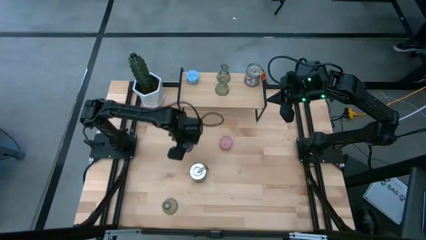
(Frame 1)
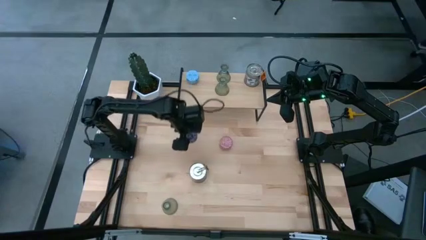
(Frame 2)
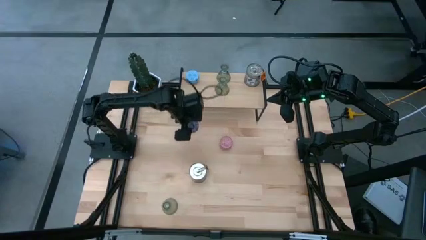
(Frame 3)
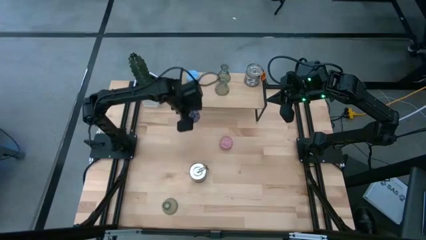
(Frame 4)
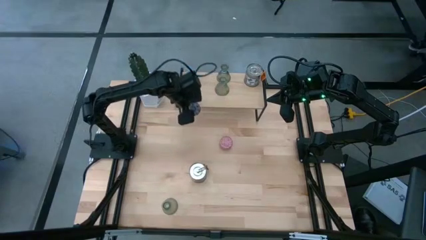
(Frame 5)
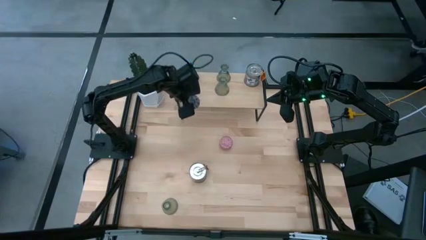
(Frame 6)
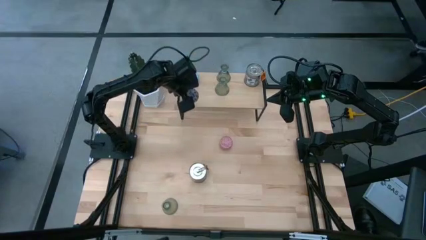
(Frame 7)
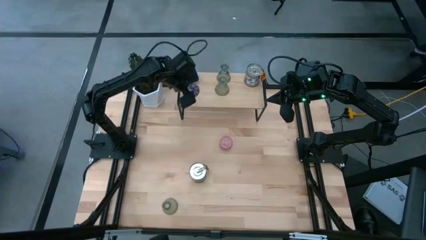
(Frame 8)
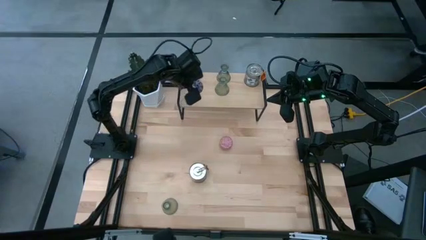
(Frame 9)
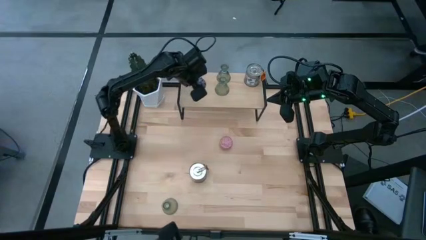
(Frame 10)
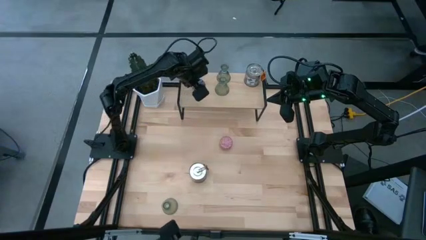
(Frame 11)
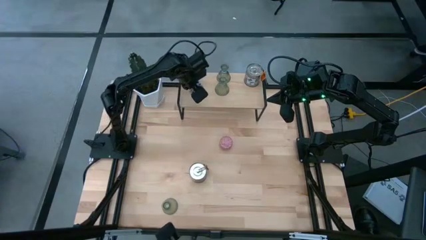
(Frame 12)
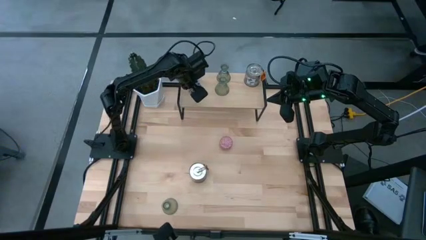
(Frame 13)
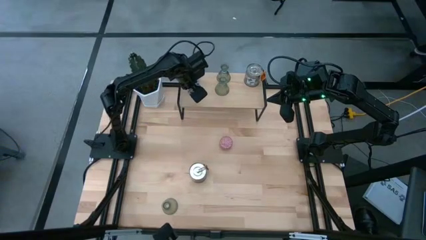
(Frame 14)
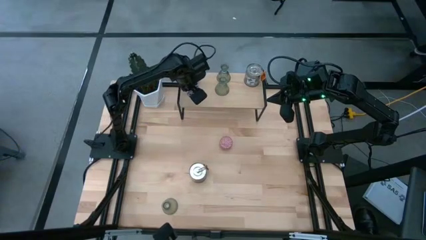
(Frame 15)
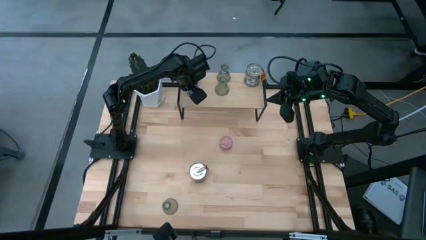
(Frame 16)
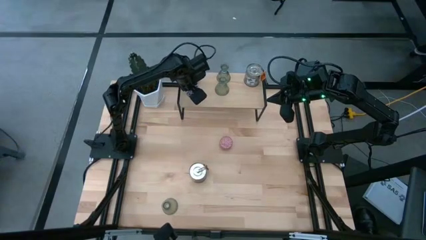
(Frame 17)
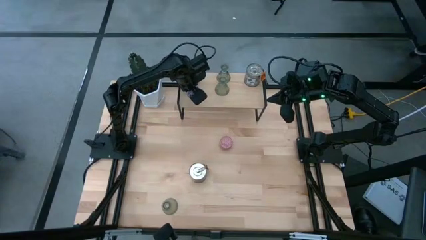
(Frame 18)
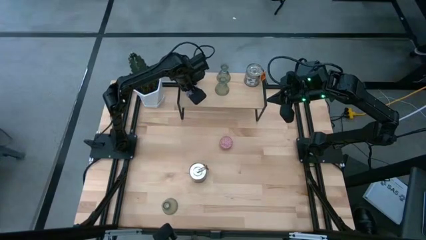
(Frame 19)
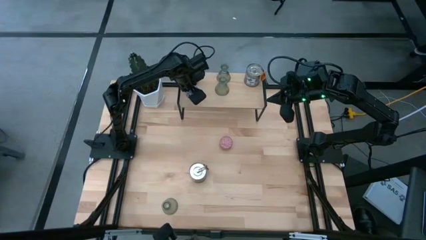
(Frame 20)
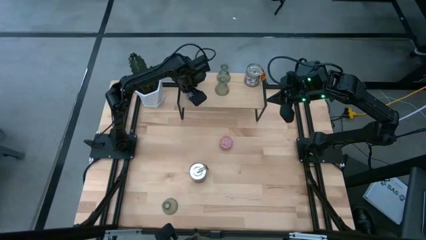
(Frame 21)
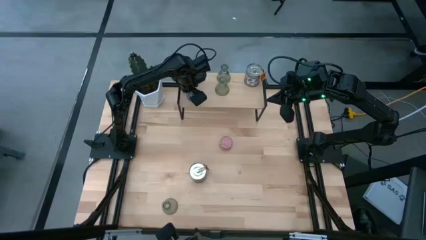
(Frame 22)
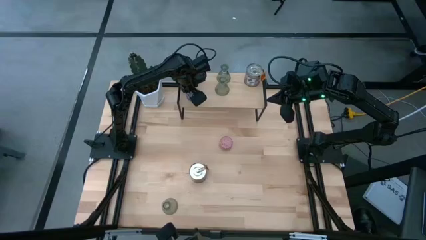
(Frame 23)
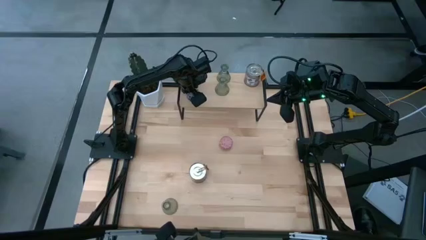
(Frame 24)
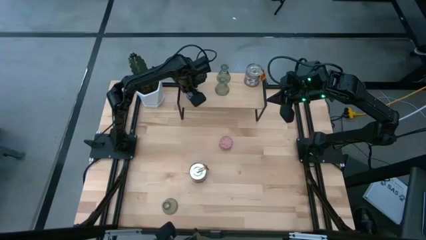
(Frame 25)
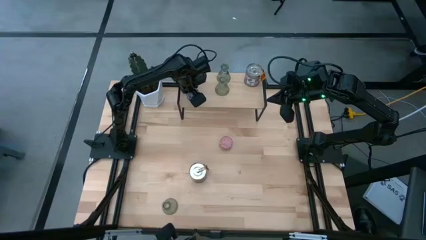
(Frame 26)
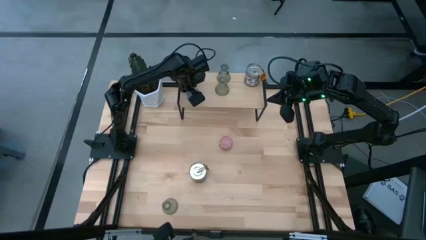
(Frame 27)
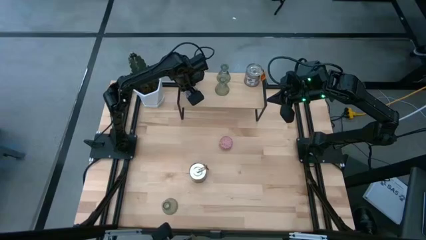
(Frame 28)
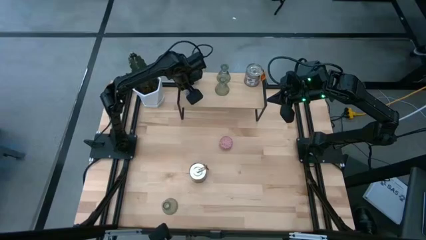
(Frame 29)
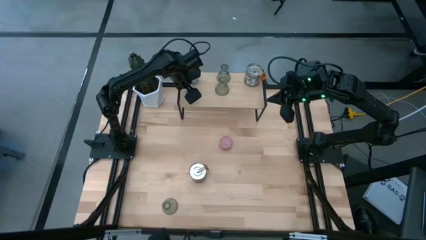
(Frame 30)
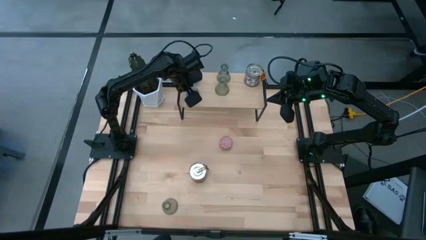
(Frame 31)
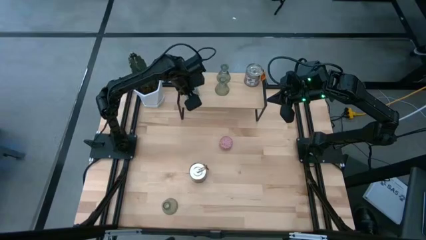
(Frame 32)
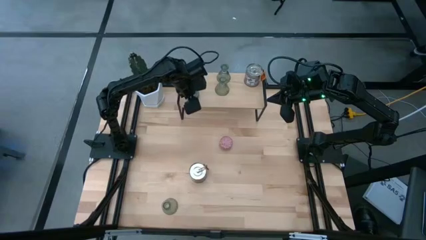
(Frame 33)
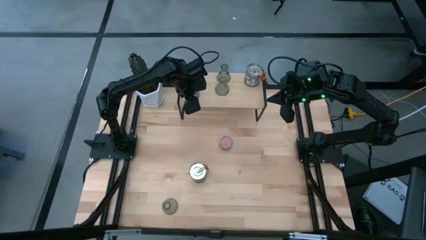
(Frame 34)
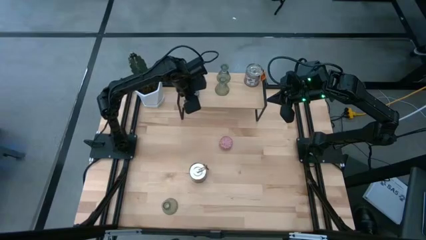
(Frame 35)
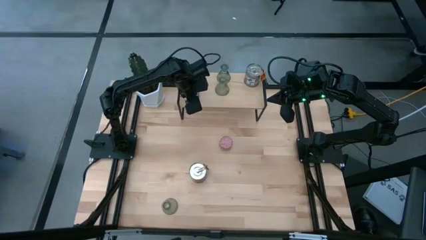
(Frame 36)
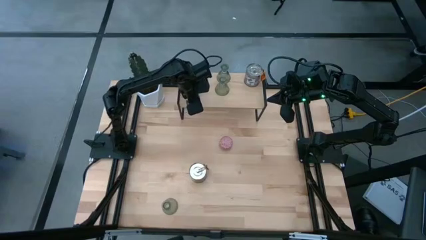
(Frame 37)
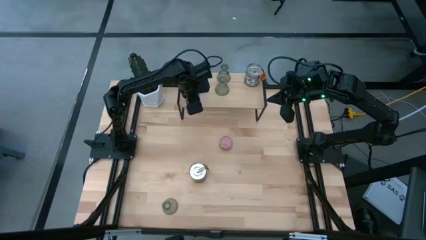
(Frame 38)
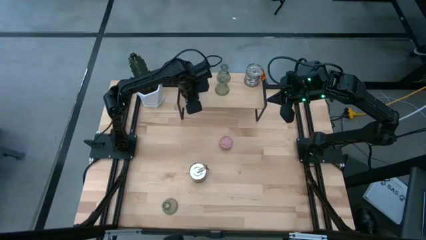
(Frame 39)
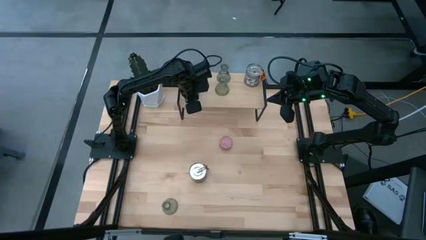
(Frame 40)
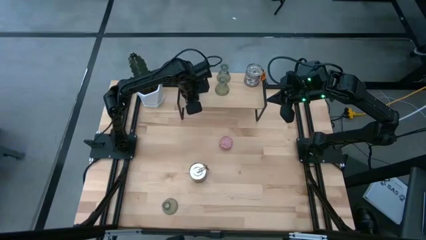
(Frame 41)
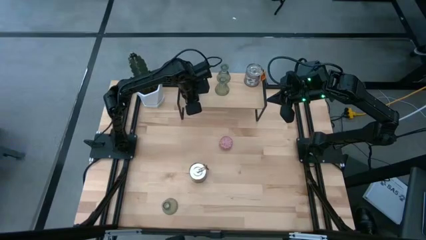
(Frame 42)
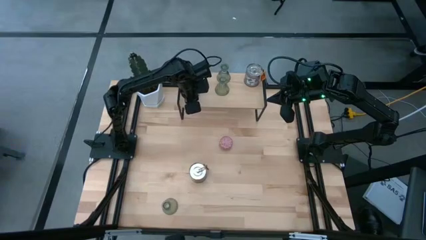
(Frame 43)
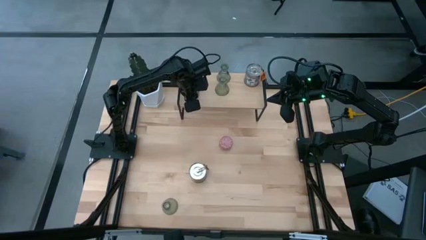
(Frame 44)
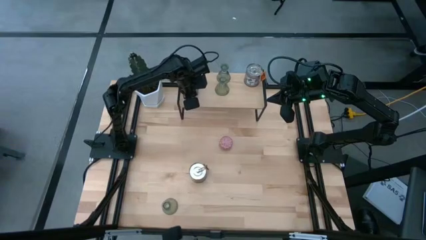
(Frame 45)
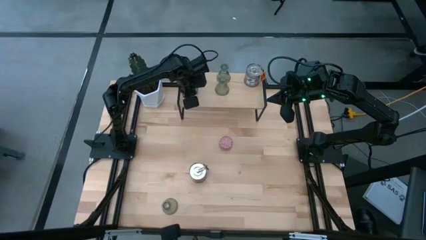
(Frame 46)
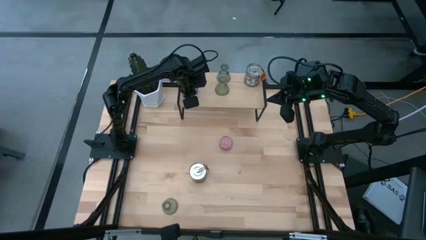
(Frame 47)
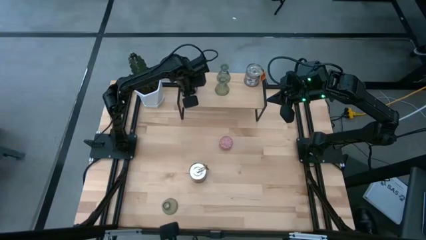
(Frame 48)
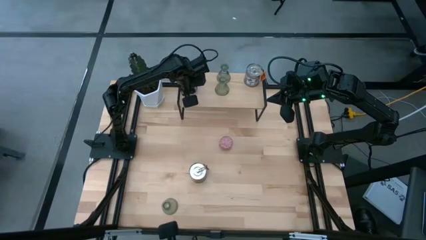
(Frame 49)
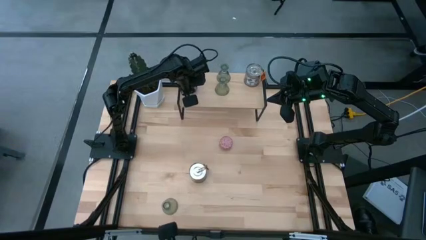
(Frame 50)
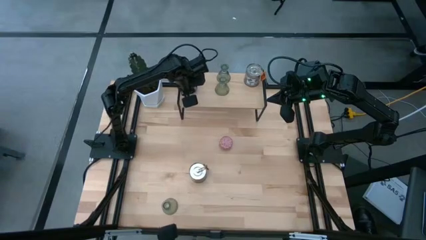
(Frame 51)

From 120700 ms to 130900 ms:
Task: Pick & Place candle stick holders
Put the red scented candle aligned with the blue scented candle on the shelf
